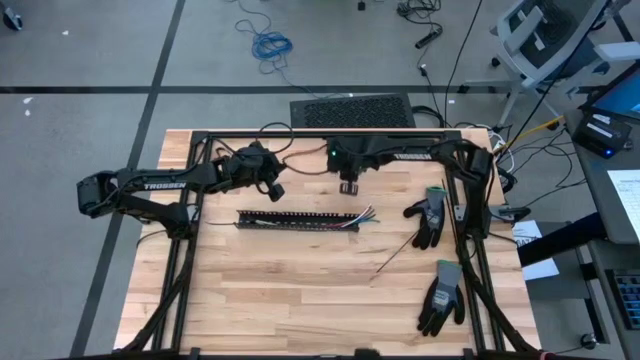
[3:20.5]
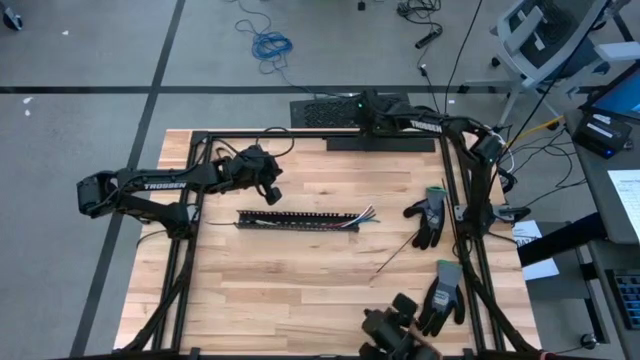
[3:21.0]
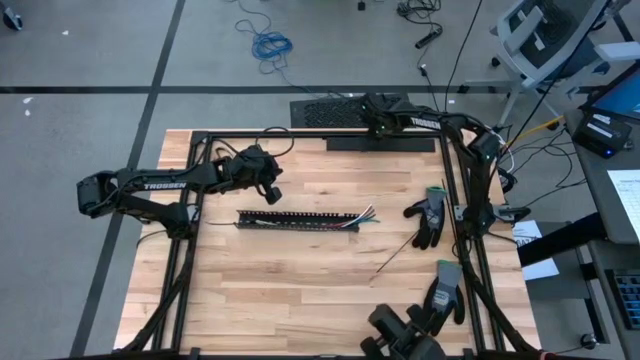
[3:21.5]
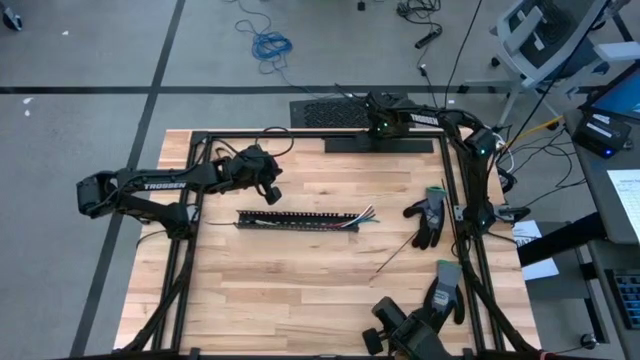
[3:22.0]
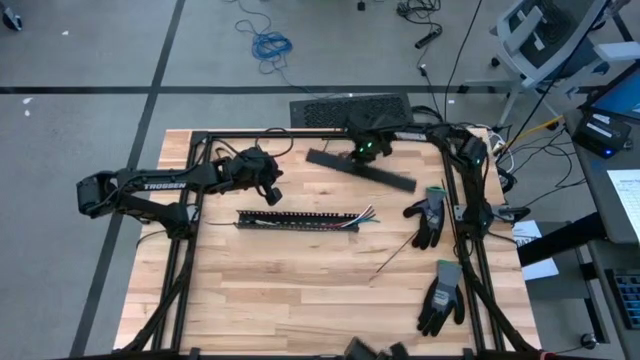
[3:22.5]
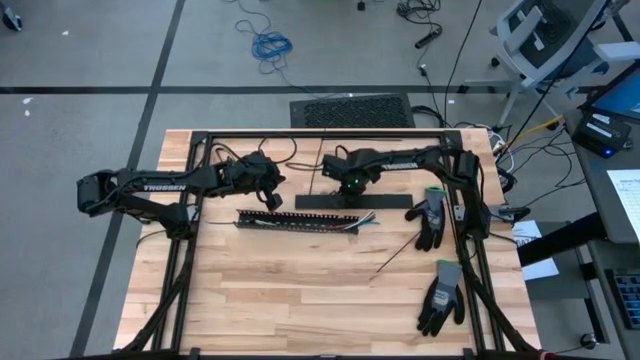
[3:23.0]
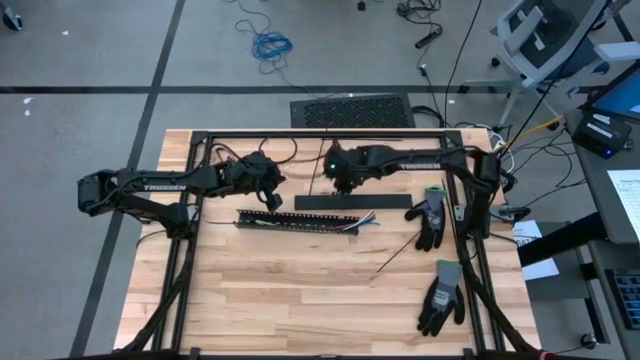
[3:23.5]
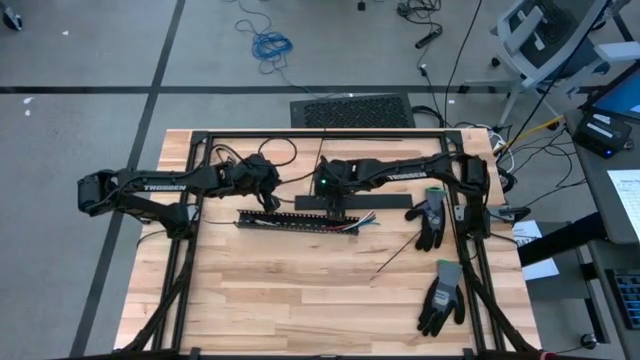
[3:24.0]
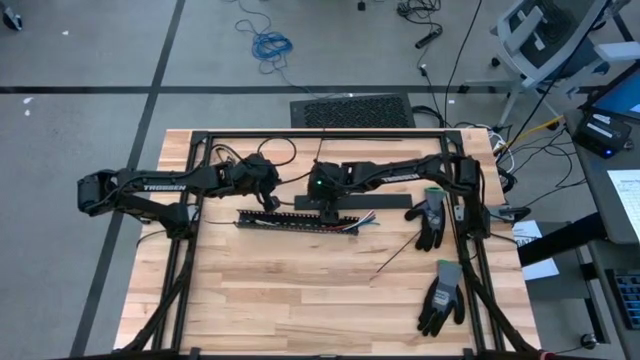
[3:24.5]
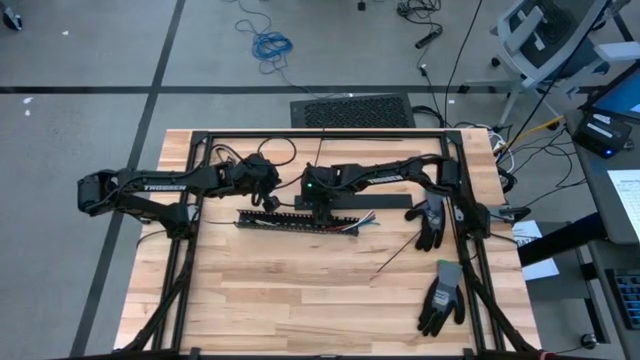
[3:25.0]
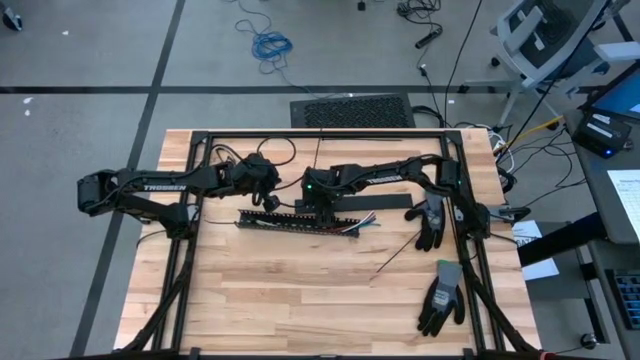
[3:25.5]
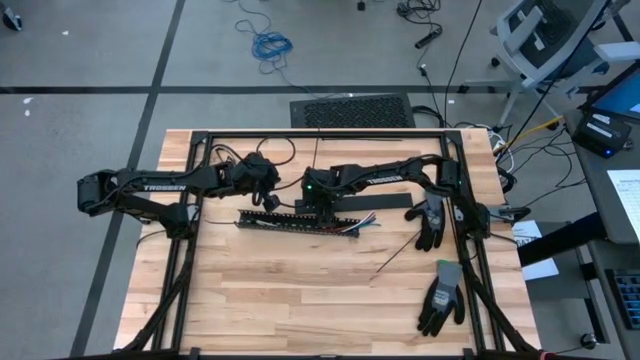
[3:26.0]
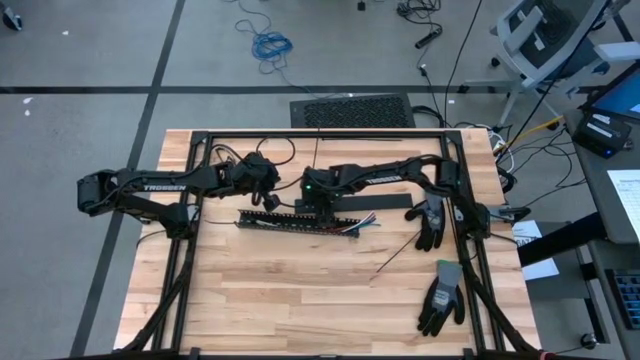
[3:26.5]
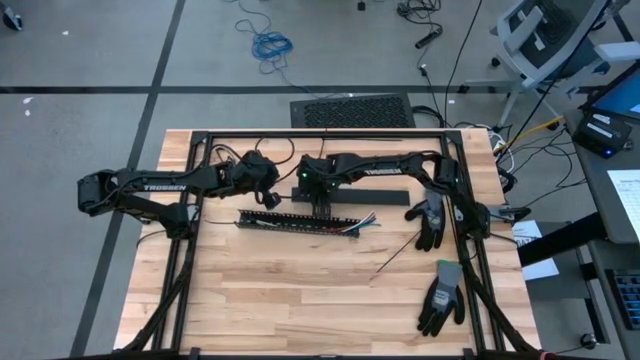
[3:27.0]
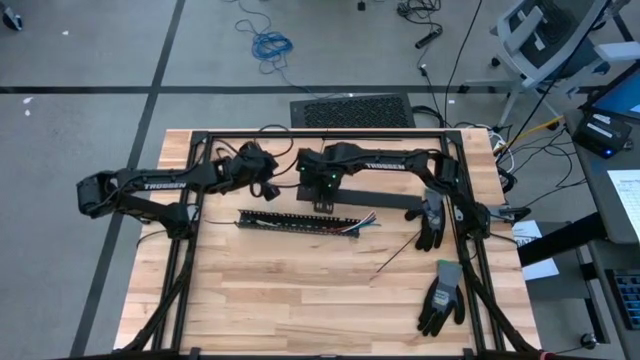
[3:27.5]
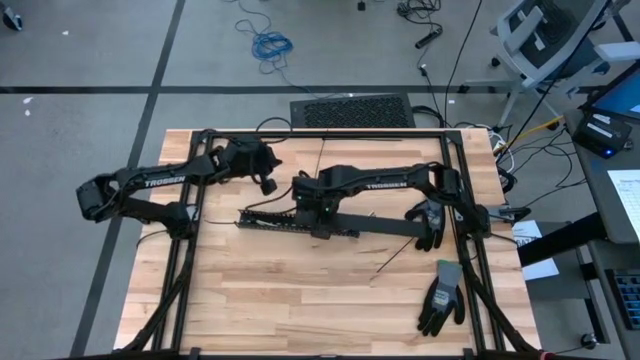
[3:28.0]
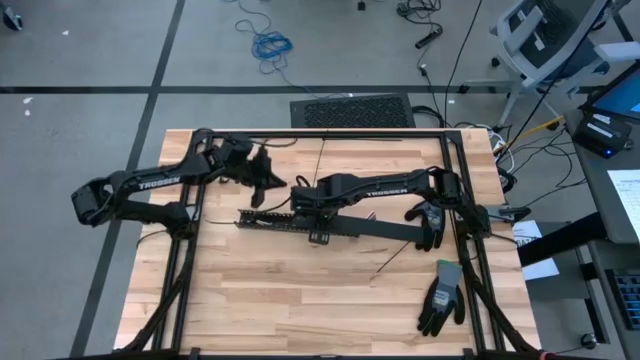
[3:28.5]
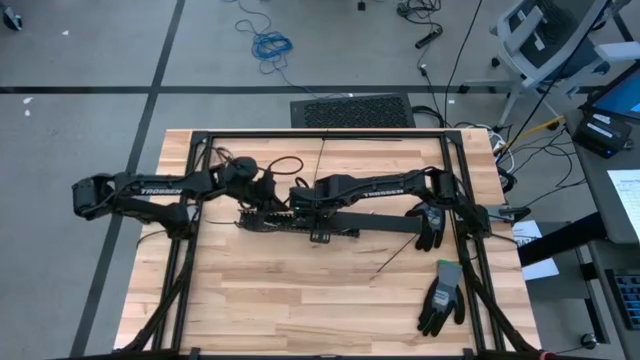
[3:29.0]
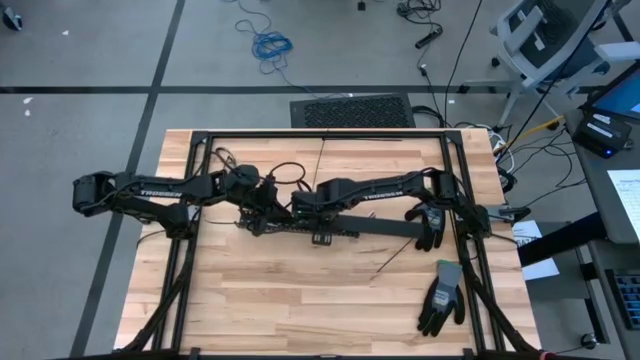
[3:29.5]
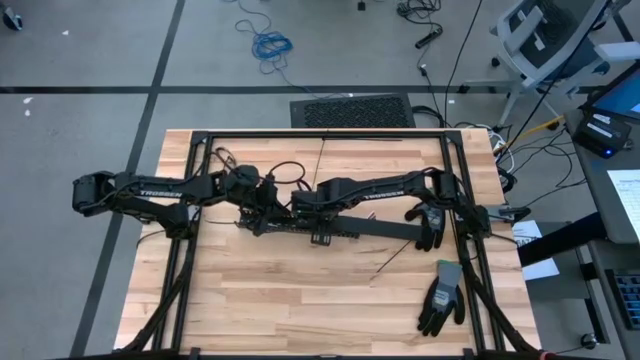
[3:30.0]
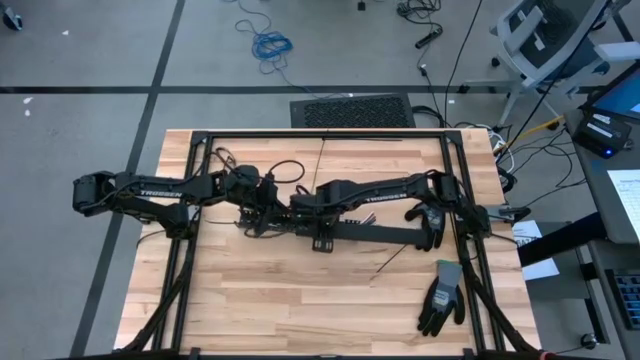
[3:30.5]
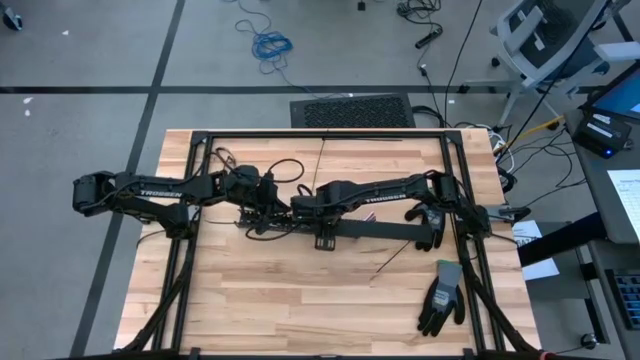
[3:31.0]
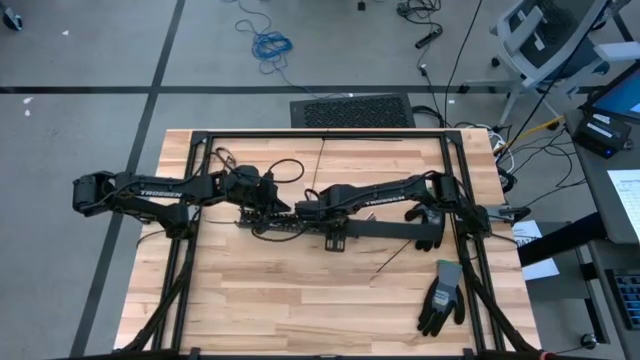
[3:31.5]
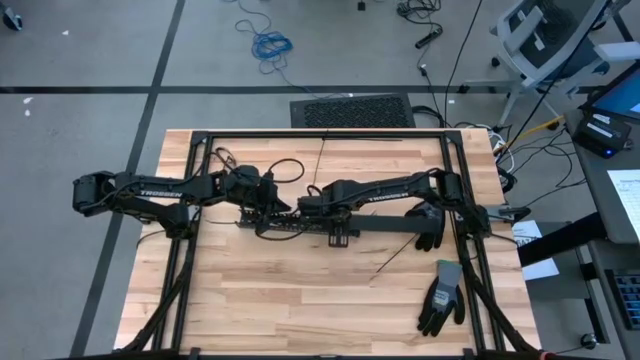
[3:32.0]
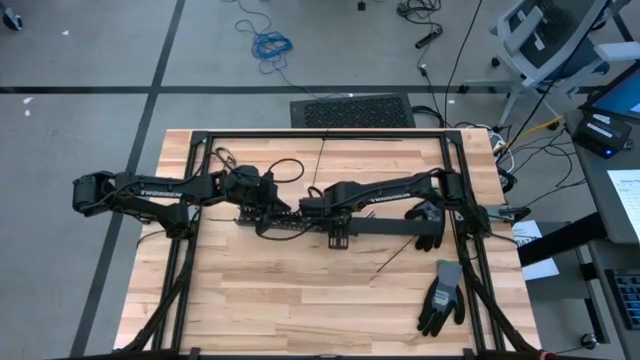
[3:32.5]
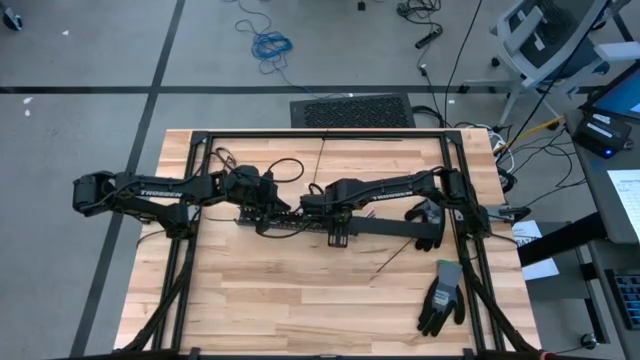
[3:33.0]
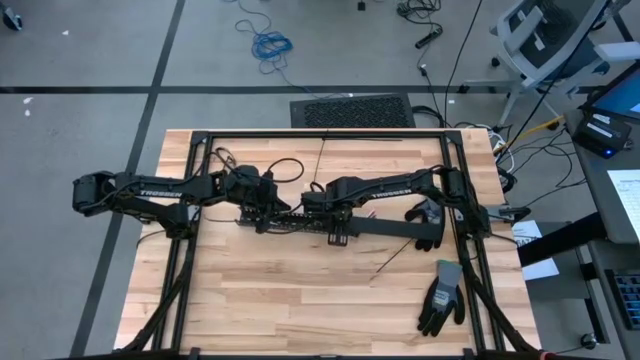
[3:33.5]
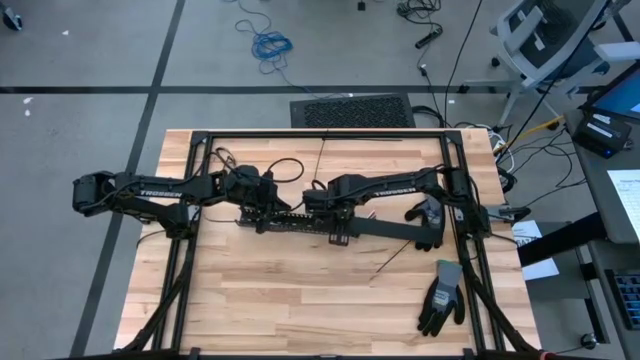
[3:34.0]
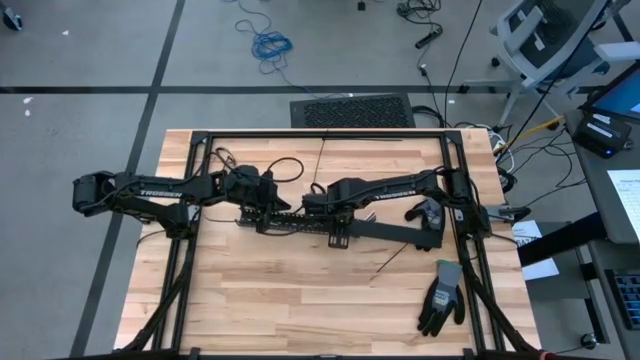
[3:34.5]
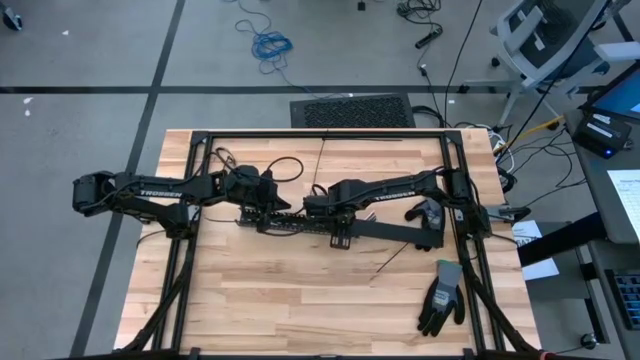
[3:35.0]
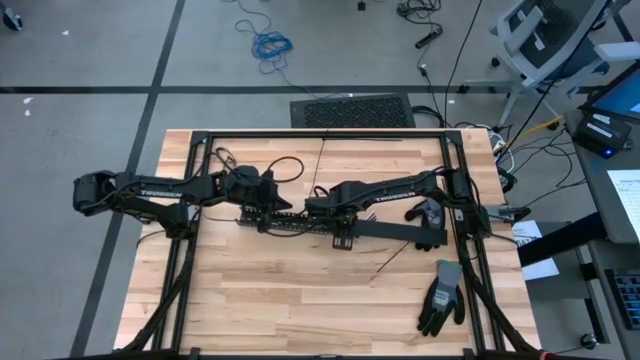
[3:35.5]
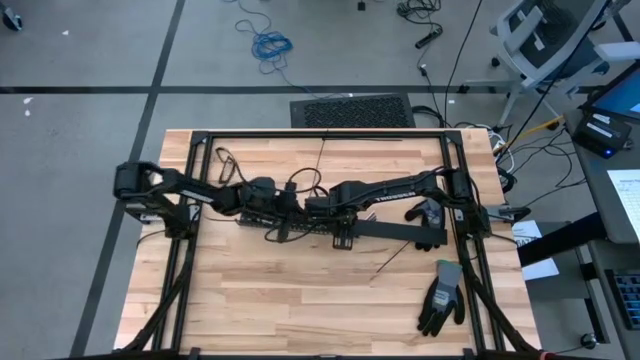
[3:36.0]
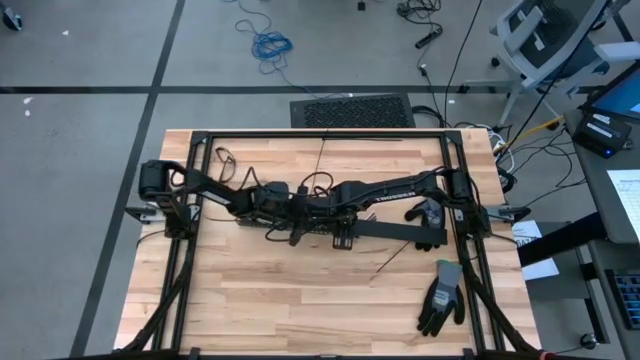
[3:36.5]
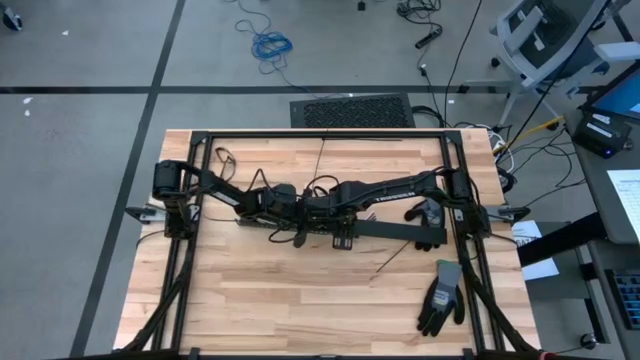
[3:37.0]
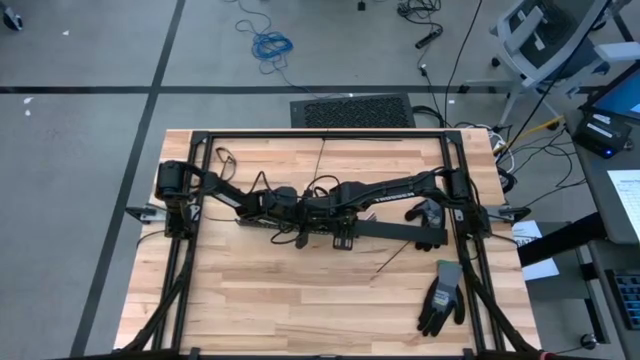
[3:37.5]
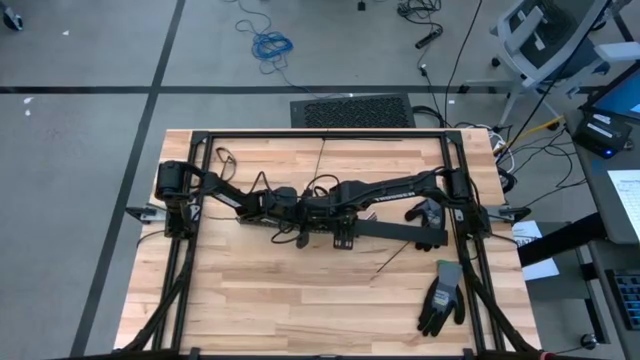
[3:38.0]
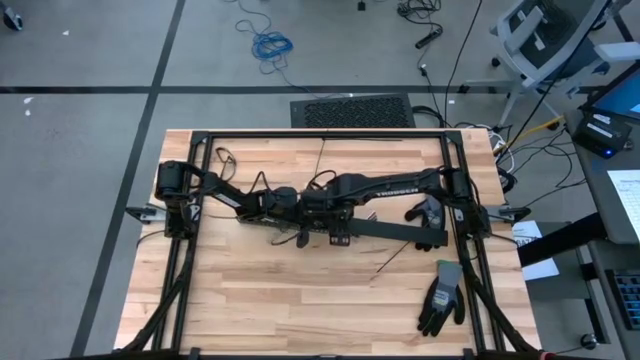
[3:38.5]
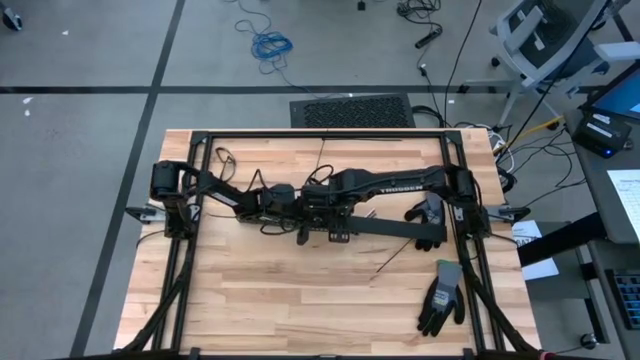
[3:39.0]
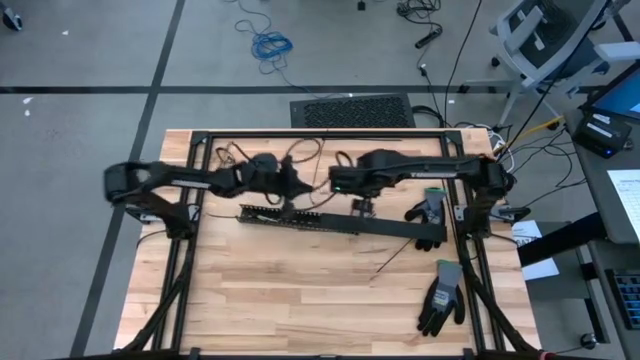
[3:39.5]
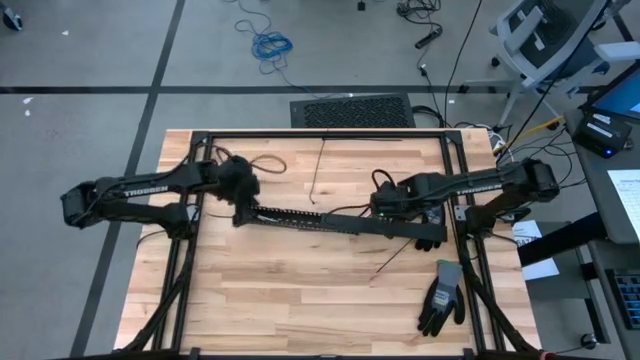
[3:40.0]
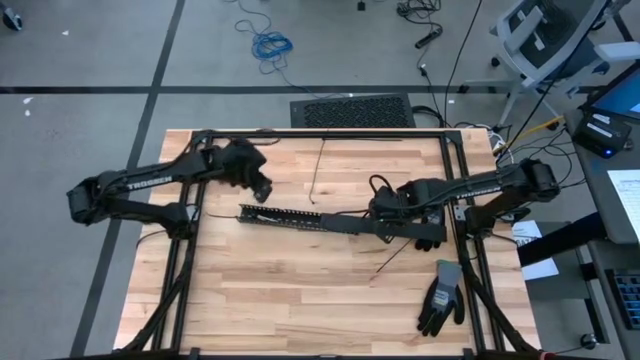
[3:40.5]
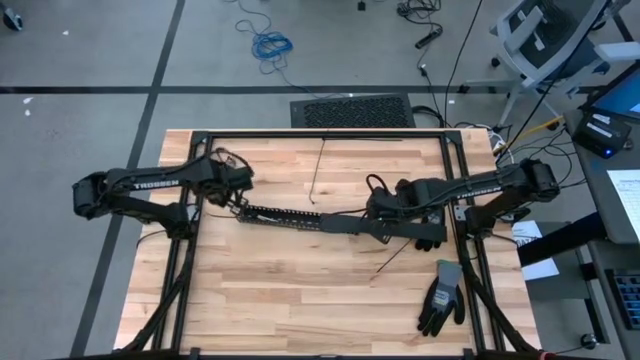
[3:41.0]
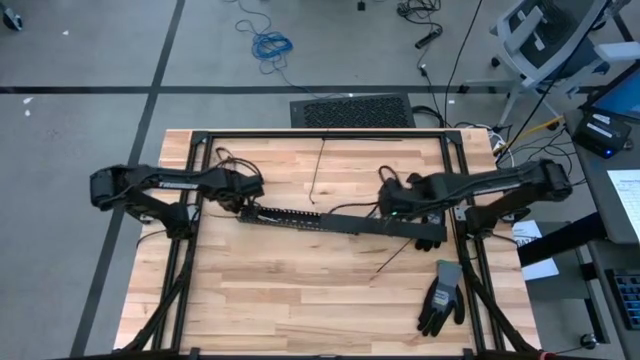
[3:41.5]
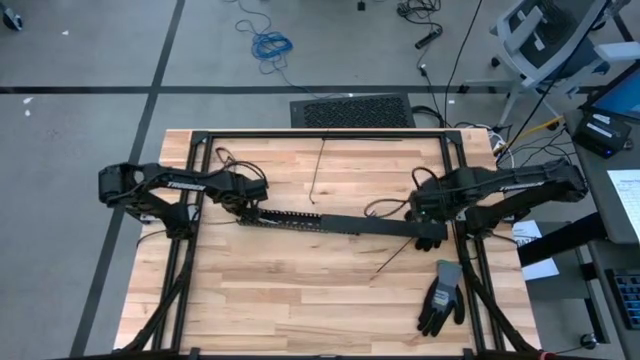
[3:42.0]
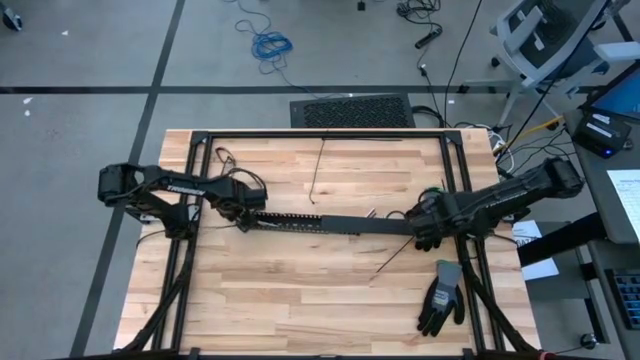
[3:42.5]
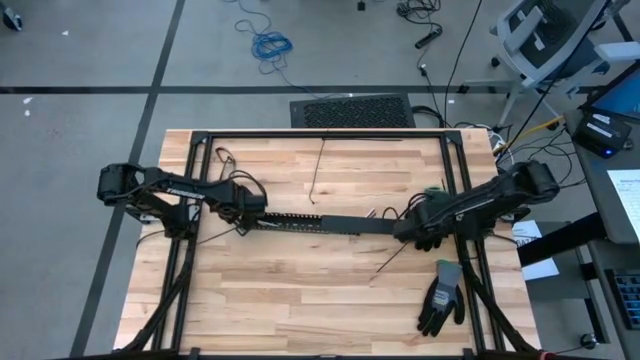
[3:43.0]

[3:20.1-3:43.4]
Task: Ziptie cables
Close the black cable duct cover
